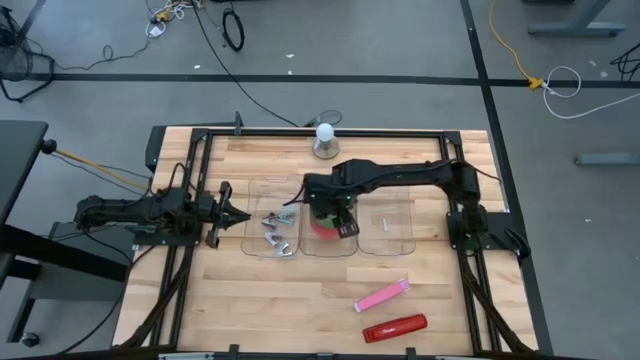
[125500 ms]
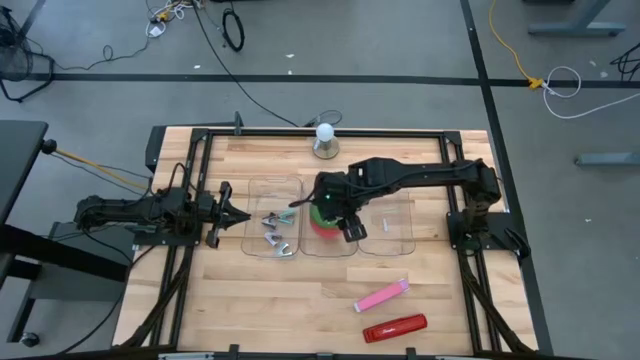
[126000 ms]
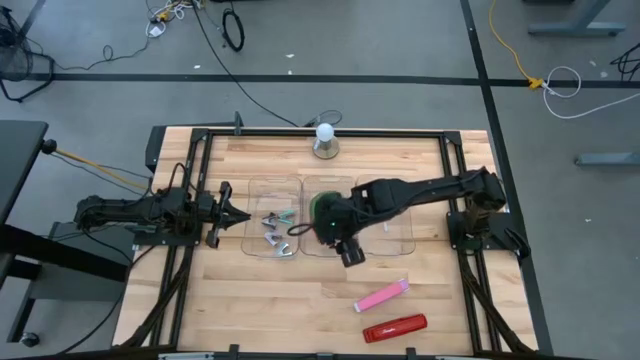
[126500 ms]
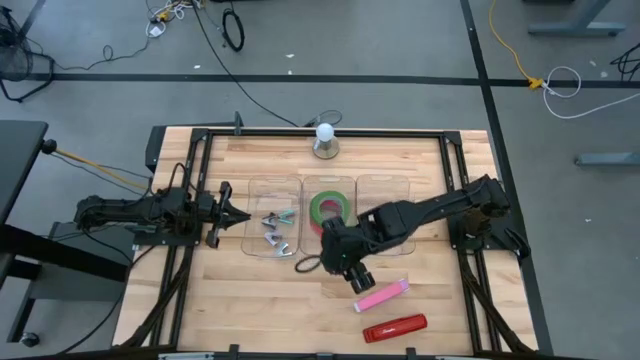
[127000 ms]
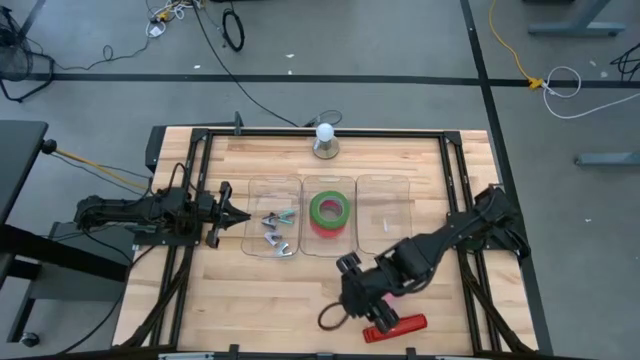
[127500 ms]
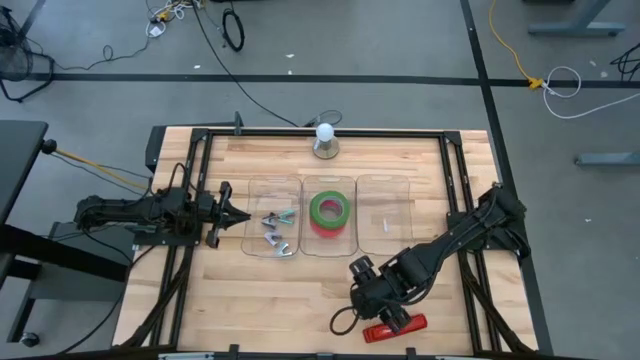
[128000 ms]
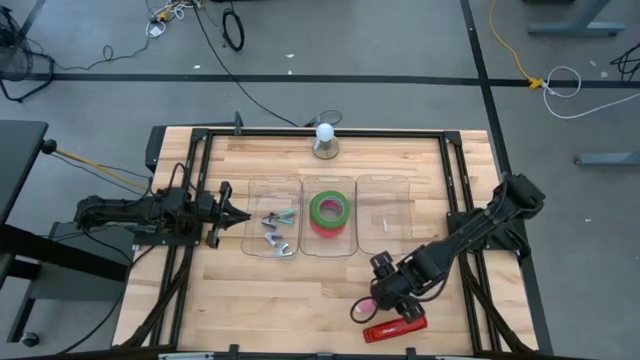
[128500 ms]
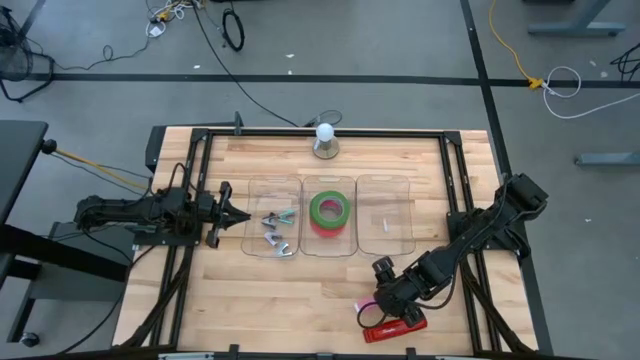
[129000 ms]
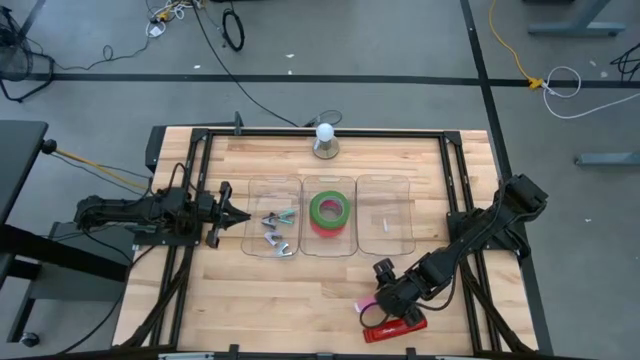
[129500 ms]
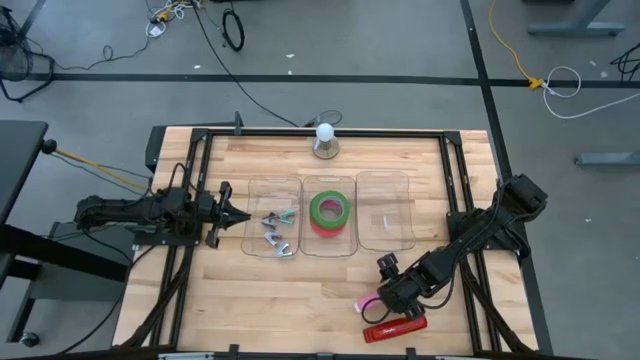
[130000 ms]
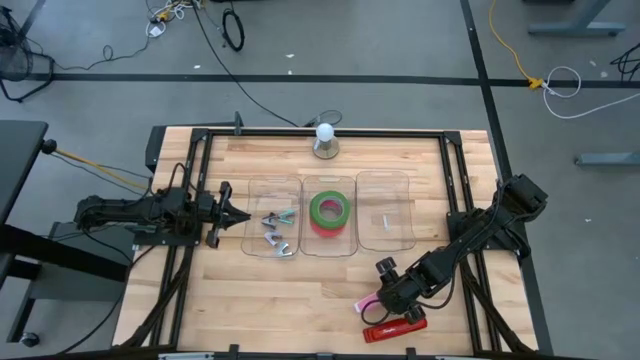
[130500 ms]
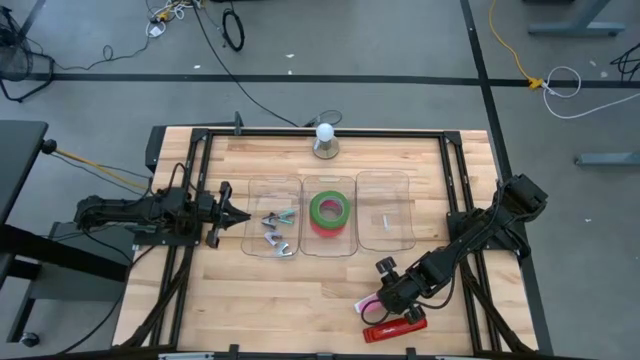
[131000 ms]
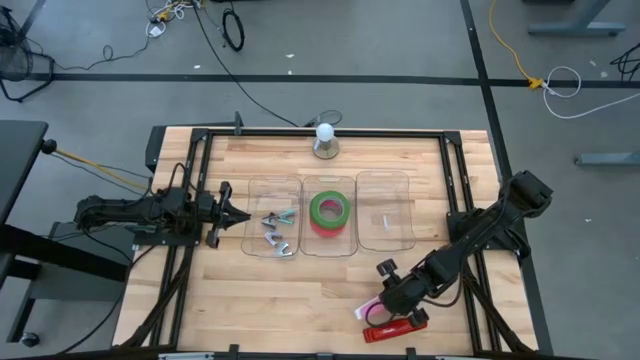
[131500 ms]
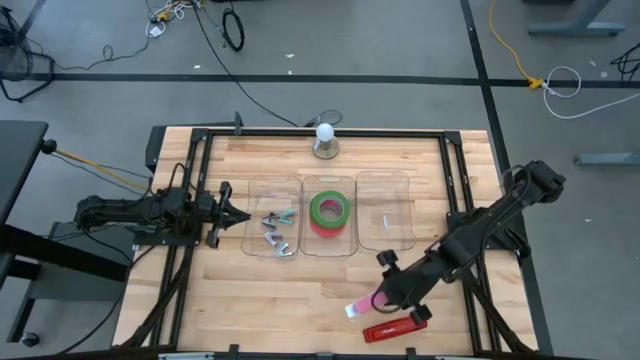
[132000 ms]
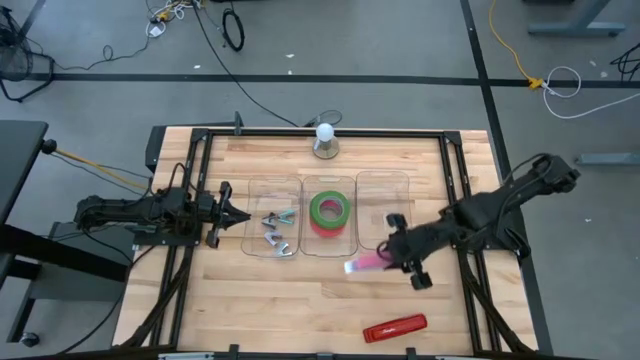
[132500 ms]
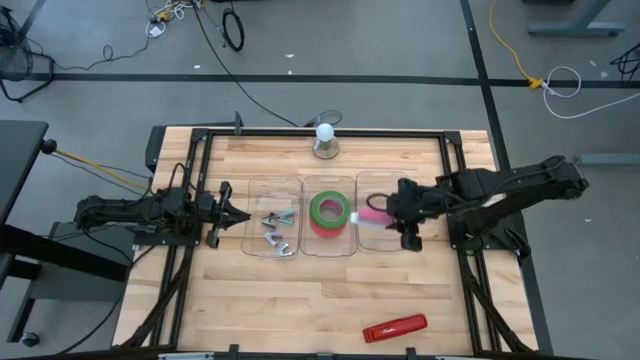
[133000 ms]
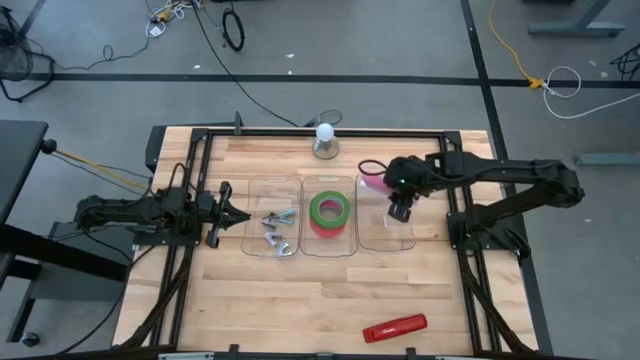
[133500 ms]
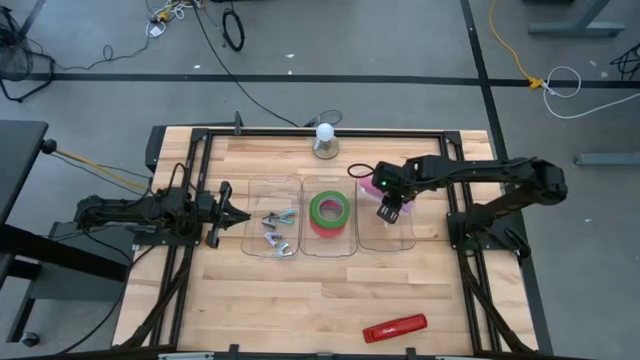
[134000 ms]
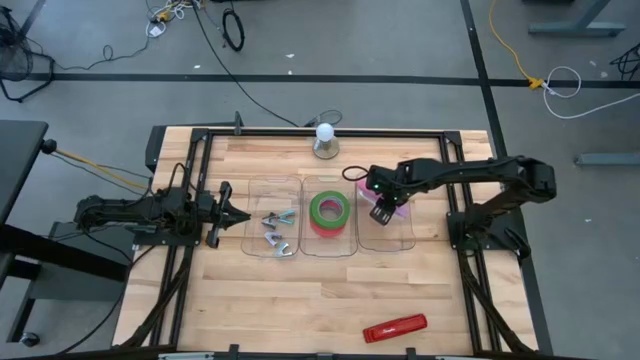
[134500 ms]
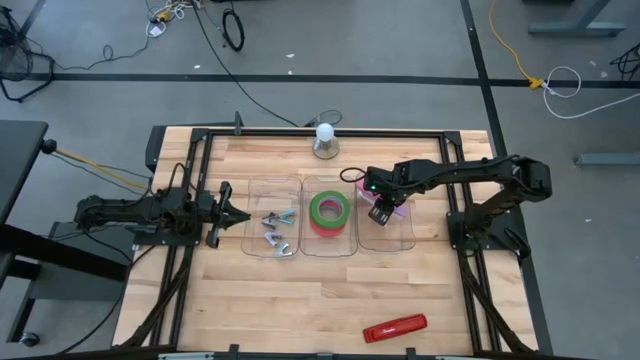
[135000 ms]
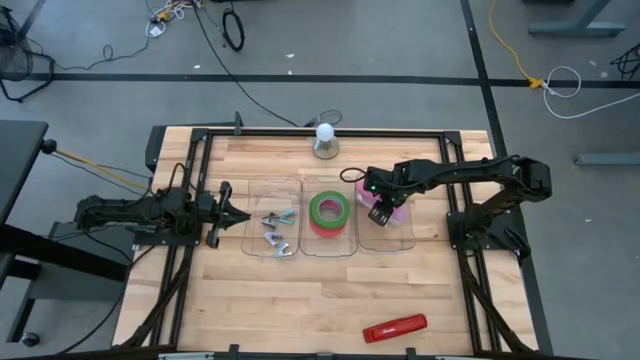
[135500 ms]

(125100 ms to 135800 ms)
Task: Pick and place Stapler, Stapler remover, tape
Put the pink stapler into the right transparent bin

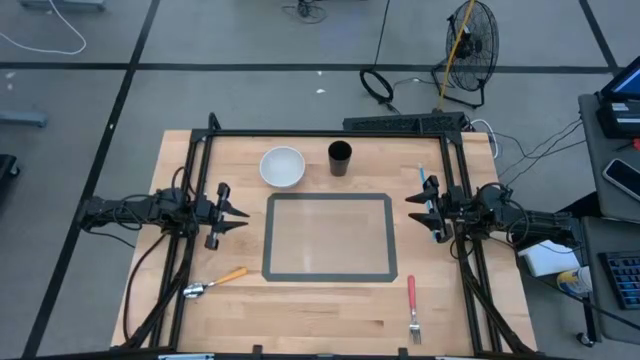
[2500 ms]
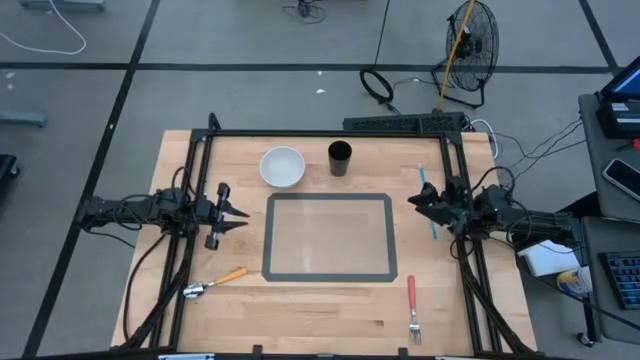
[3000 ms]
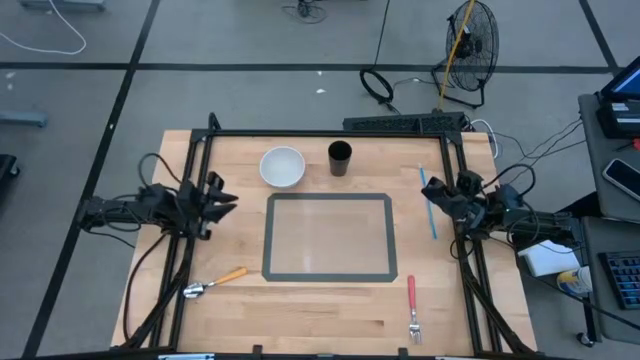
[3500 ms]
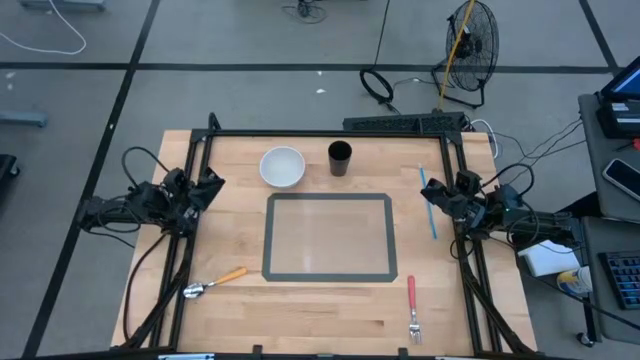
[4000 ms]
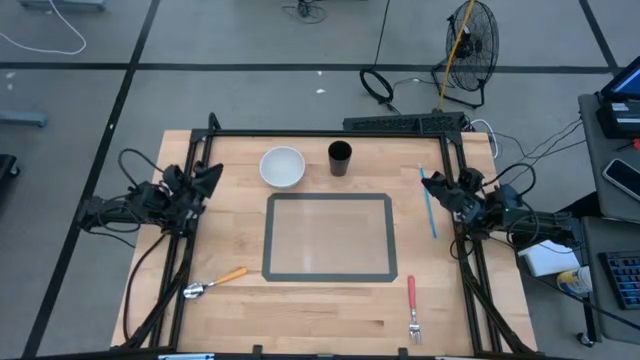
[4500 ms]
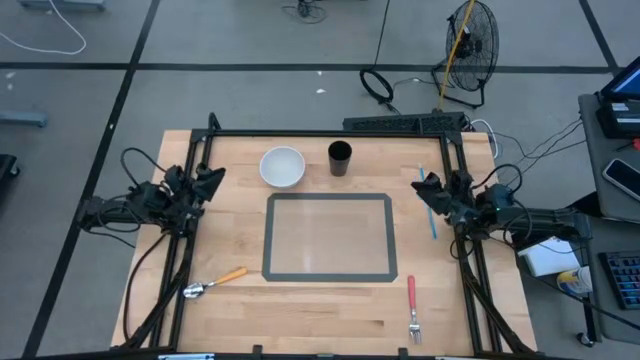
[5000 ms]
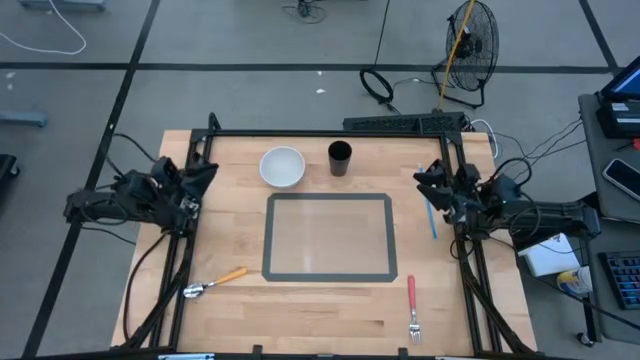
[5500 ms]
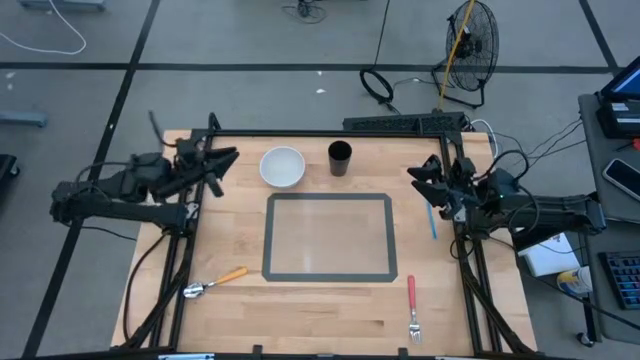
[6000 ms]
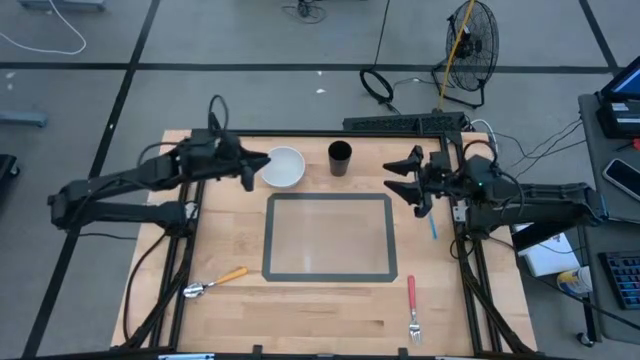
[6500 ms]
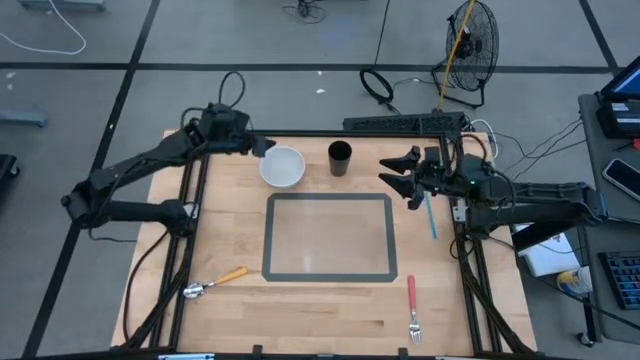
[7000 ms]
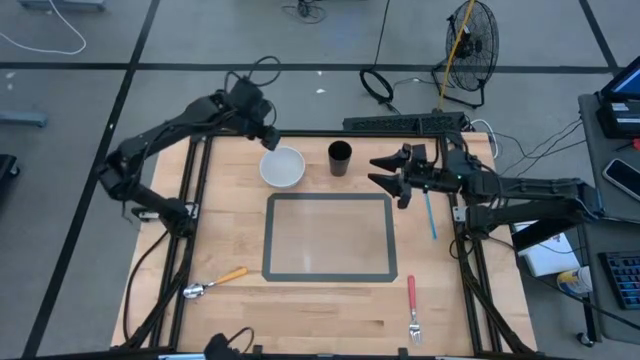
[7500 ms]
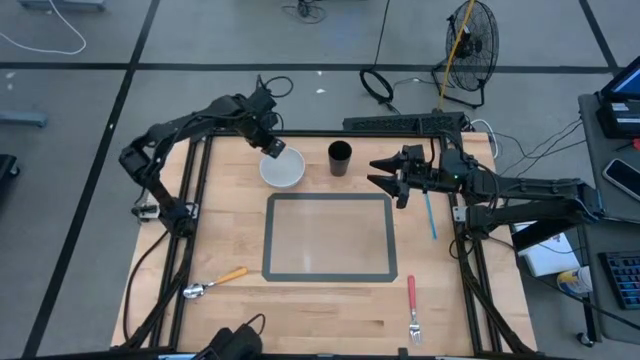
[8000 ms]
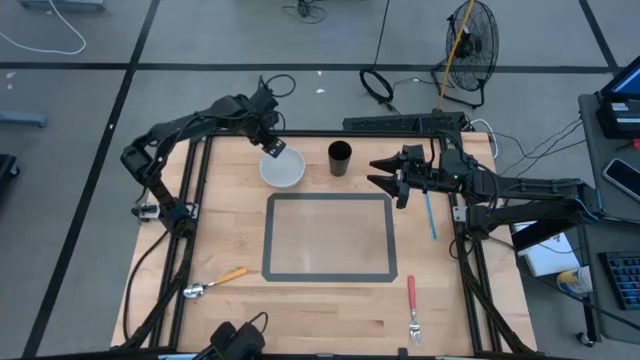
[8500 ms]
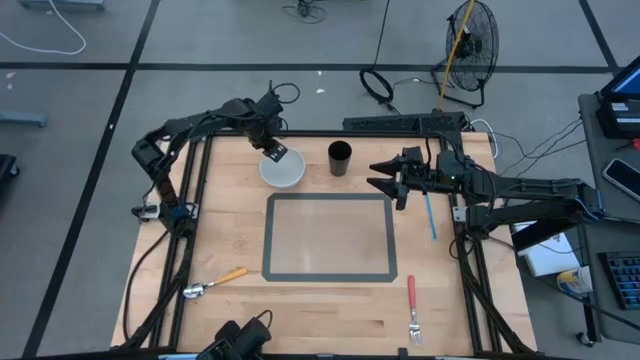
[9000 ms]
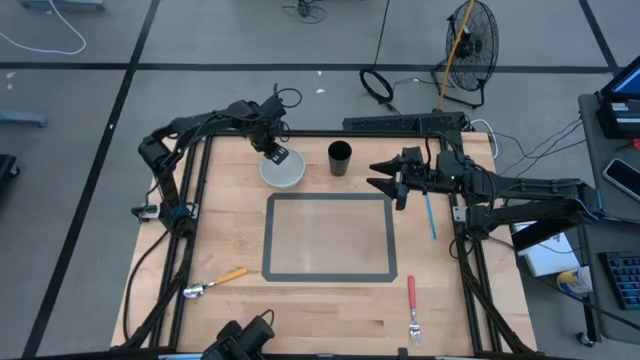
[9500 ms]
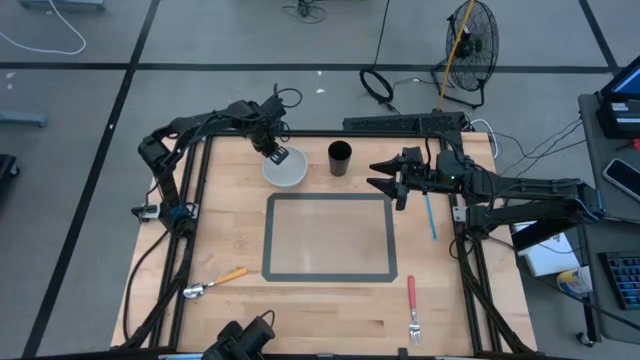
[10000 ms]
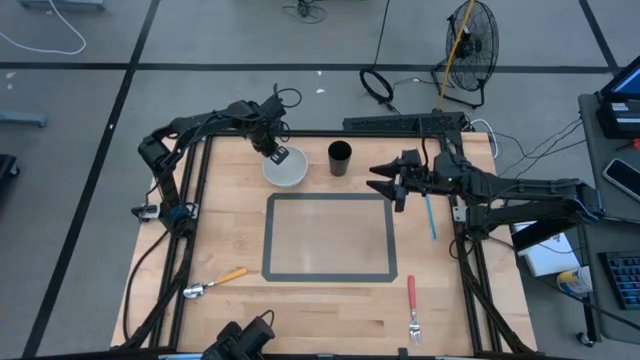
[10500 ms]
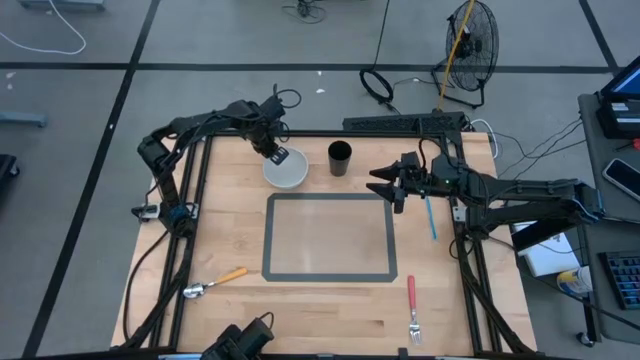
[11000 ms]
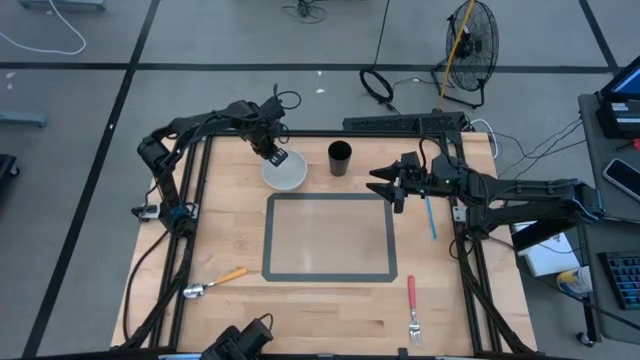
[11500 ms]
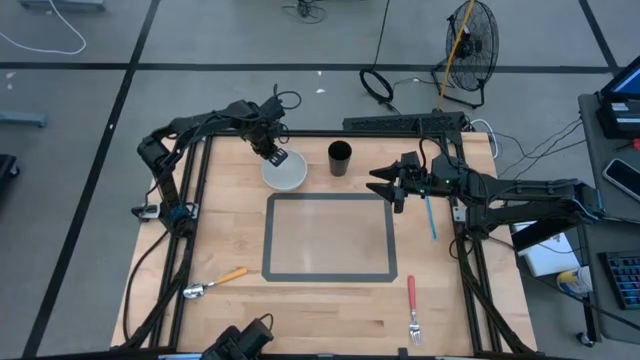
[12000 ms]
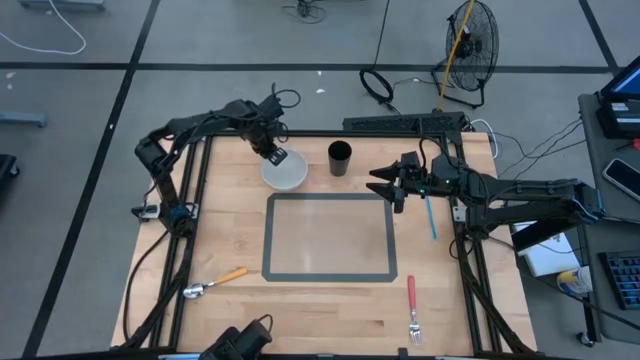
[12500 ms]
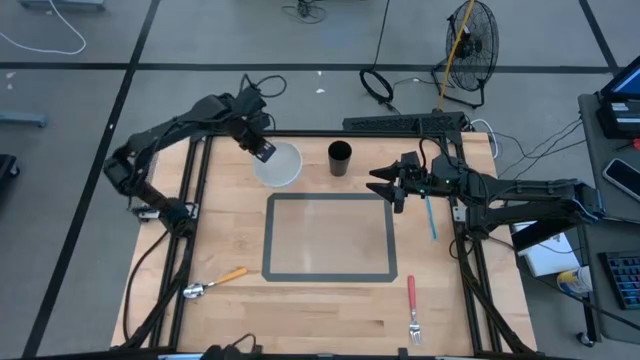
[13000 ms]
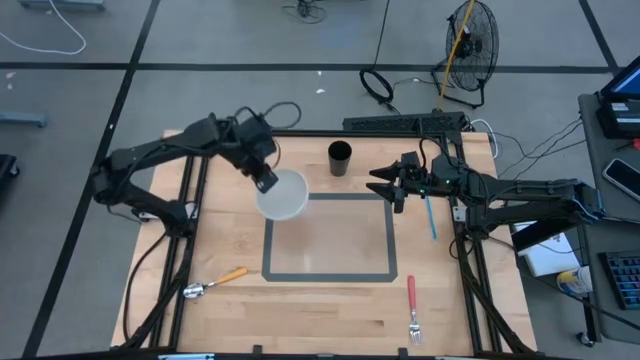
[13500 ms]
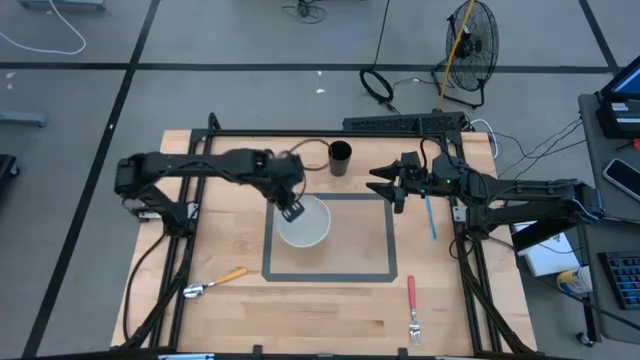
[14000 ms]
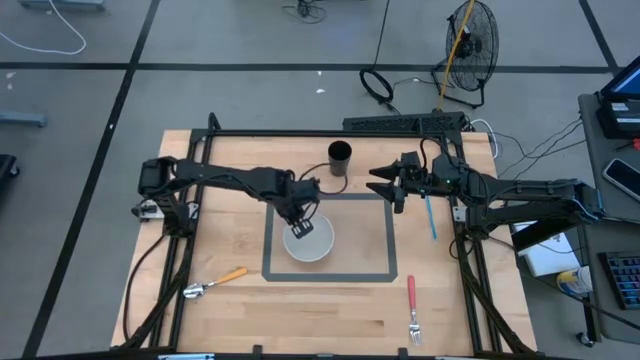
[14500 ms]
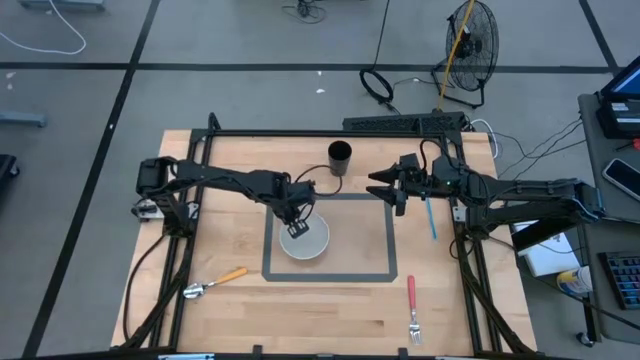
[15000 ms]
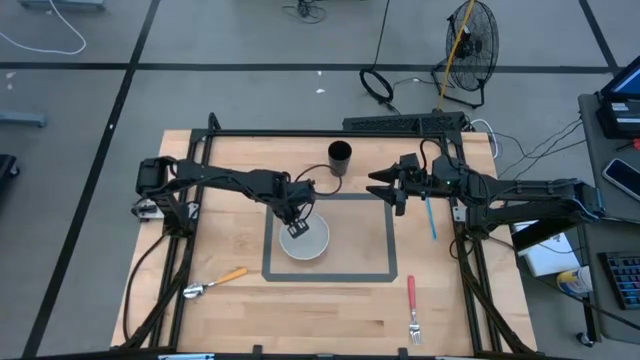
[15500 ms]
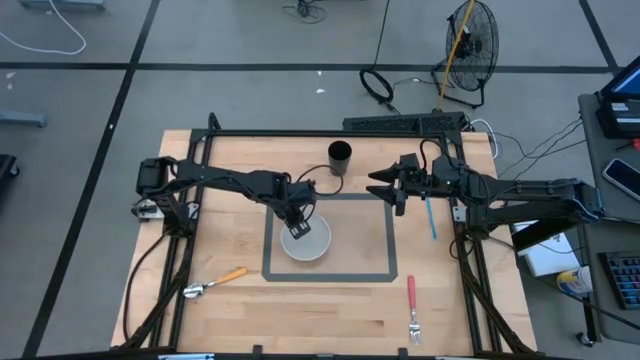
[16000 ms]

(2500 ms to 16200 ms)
Task: Pick & Place Utensil
Put the white bowl on the light brown mat
